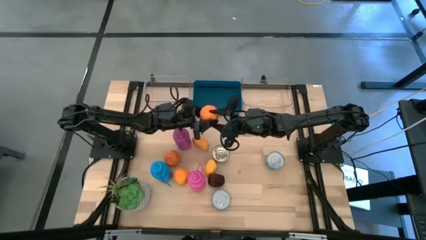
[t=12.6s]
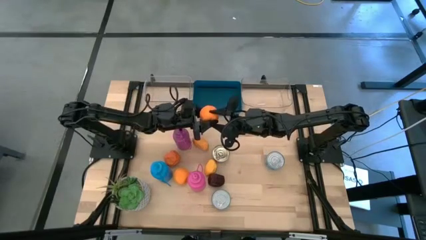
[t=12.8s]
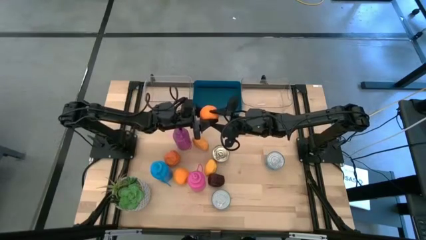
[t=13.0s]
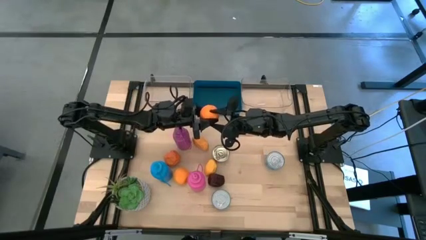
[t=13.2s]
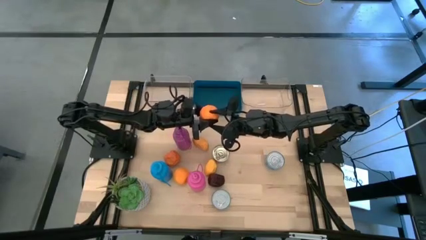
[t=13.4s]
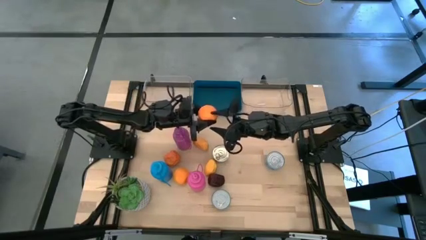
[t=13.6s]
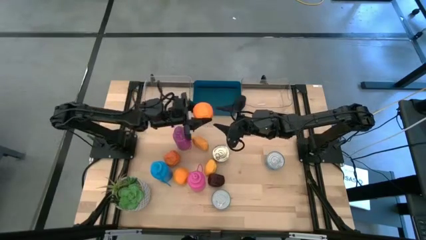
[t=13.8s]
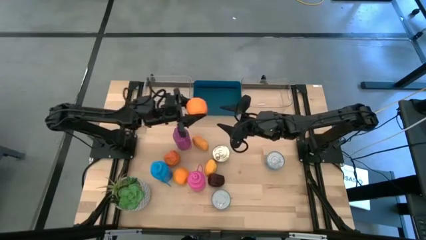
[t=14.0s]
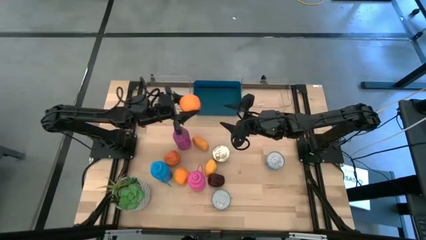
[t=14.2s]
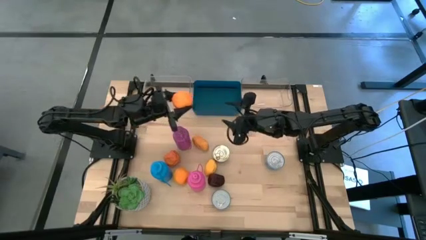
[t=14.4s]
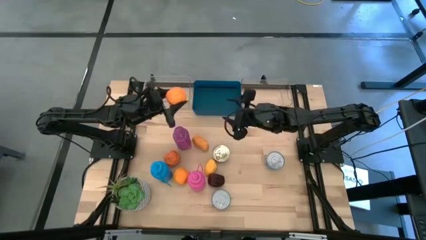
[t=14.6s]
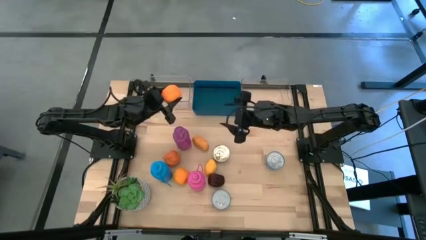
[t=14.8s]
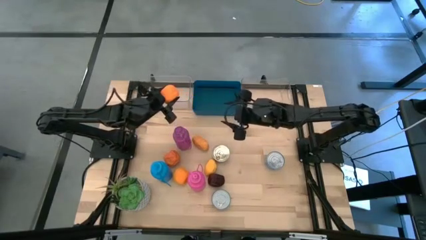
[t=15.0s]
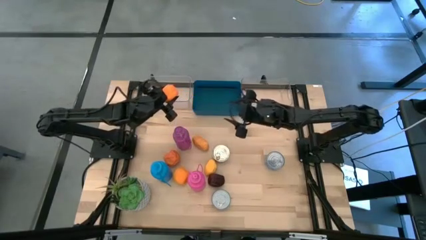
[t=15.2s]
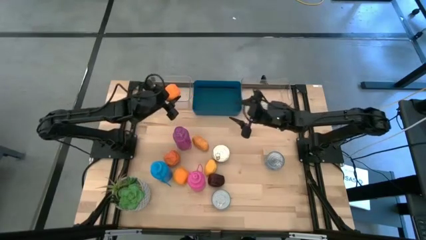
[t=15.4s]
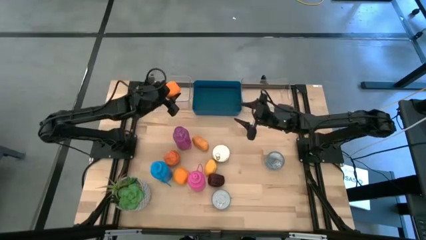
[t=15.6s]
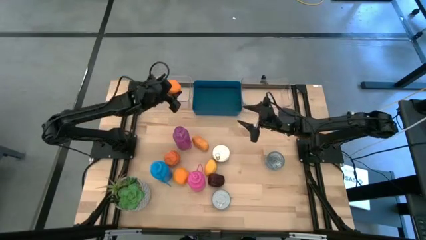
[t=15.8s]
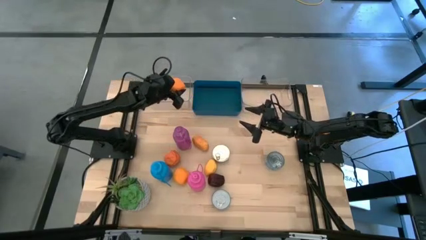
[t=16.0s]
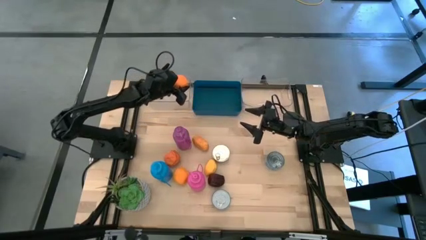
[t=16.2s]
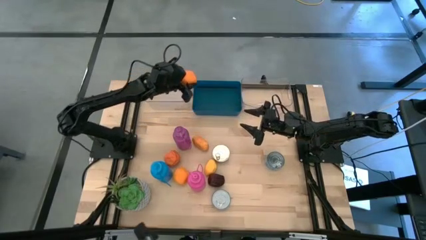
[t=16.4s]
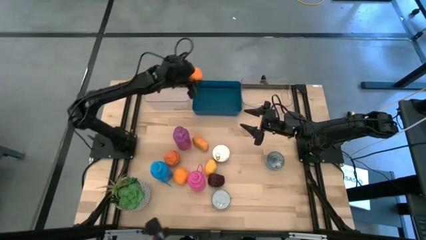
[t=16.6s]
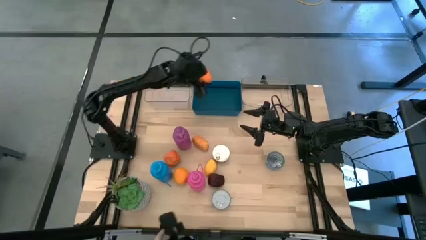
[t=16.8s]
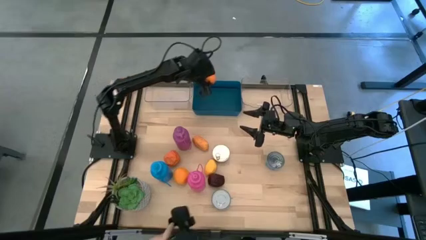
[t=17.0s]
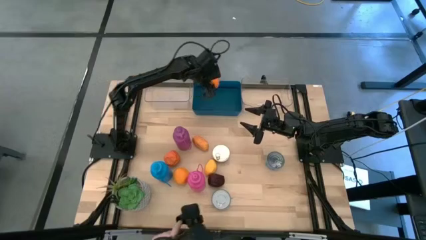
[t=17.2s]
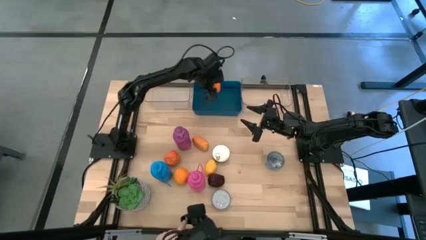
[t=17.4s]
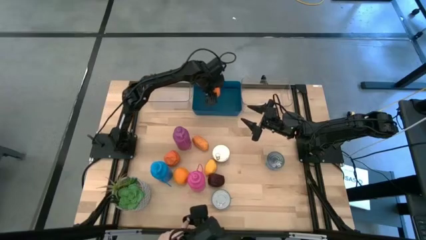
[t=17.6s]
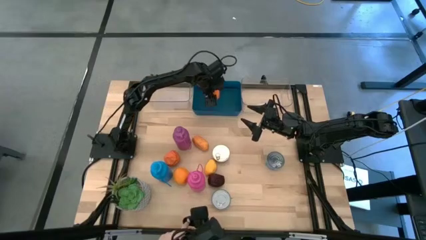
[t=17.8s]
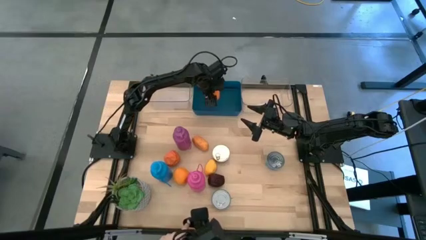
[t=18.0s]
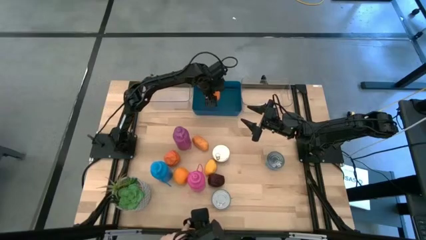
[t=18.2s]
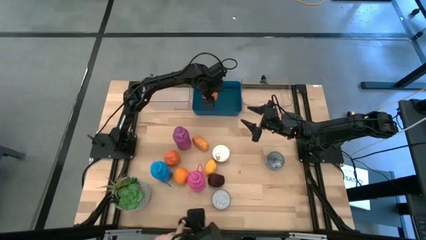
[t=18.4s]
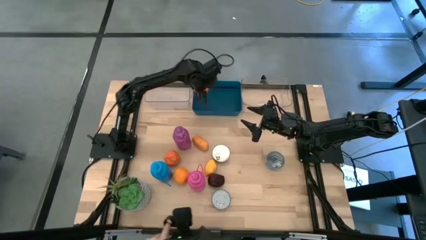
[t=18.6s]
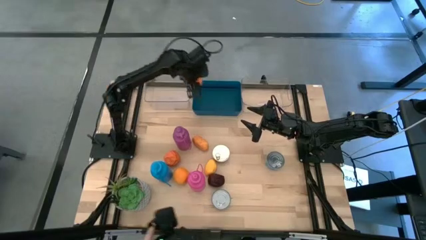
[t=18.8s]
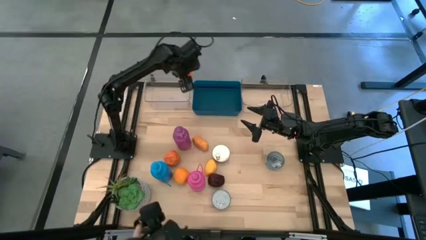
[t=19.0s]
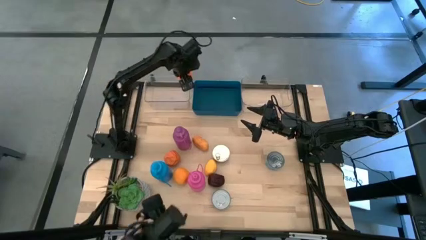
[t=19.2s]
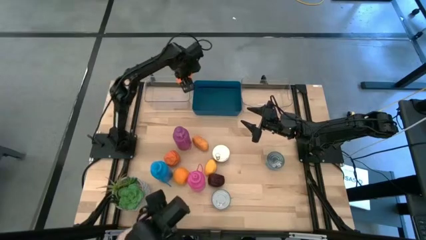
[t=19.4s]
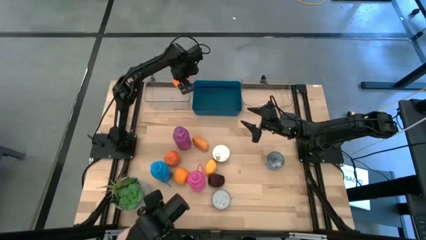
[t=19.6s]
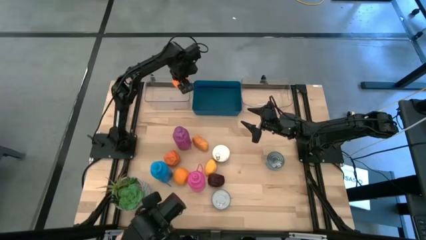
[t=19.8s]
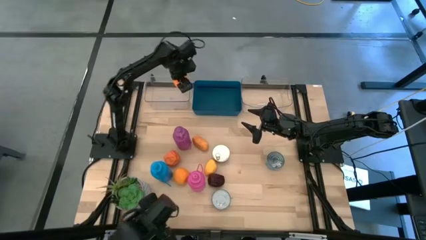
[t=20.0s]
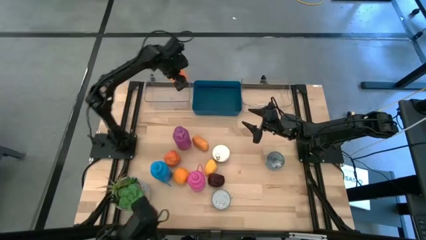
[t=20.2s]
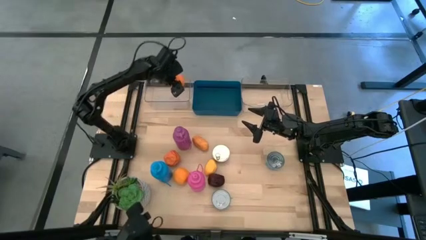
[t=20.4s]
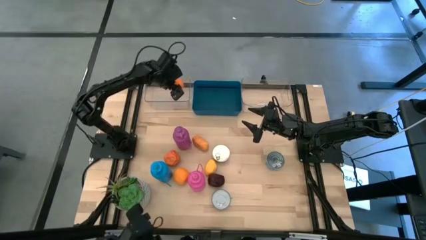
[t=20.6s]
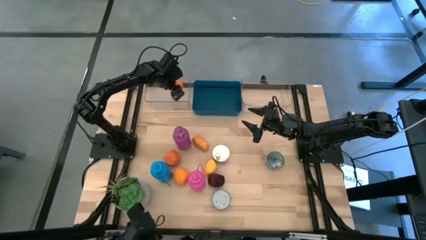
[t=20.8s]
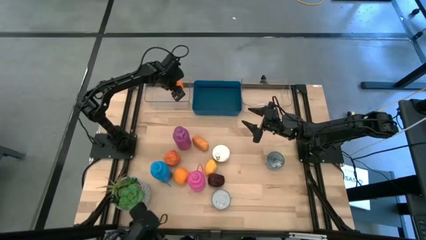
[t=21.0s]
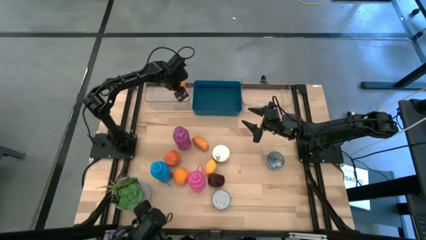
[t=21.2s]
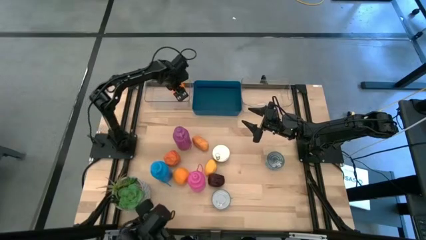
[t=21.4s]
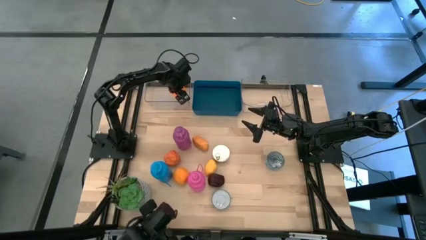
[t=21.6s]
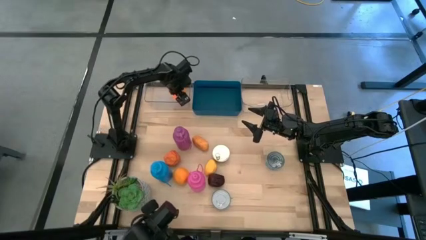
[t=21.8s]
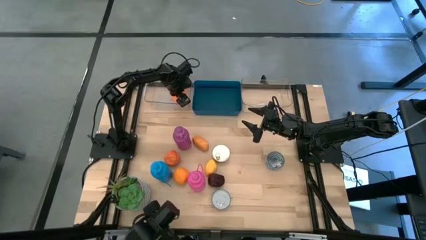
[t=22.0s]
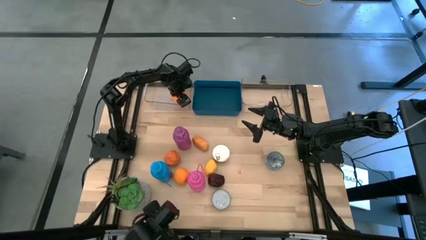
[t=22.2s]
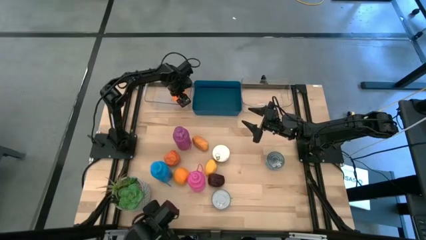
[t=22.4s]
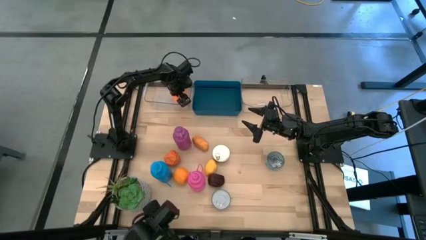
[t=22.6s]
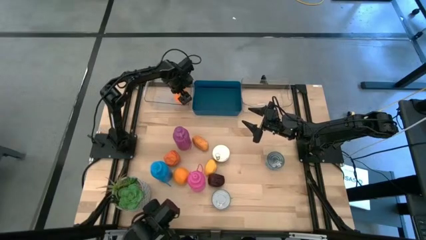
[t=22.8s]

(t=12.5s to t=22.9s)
Task: Pick & Place Food Item
Put the right orange into the left transparent bin

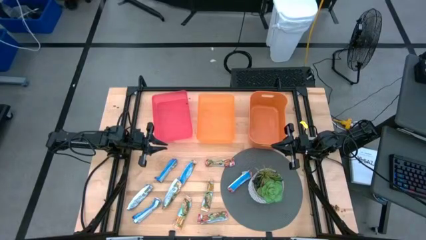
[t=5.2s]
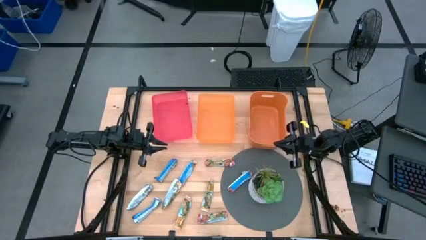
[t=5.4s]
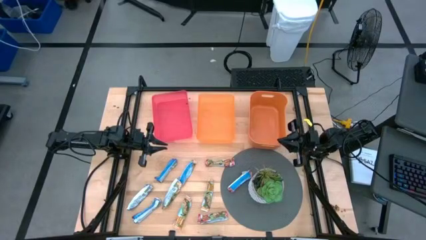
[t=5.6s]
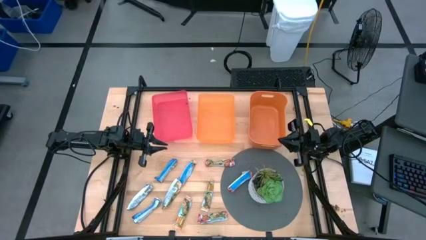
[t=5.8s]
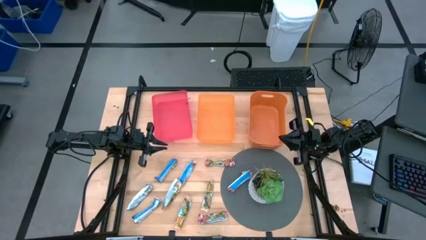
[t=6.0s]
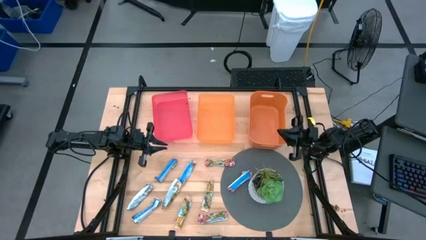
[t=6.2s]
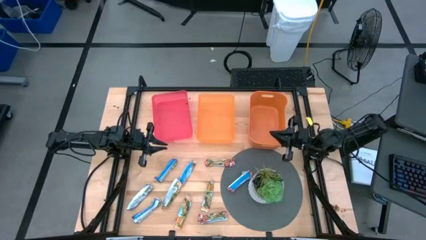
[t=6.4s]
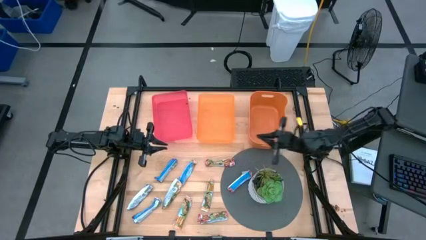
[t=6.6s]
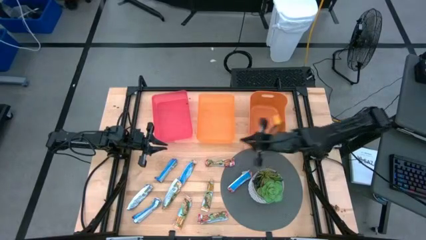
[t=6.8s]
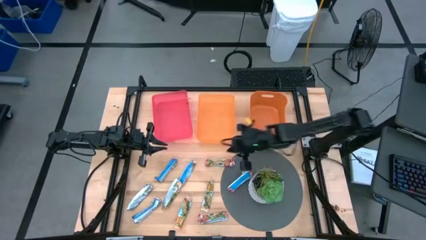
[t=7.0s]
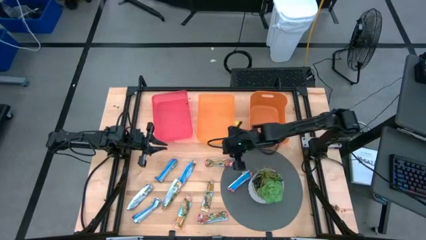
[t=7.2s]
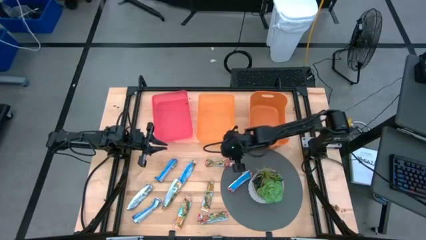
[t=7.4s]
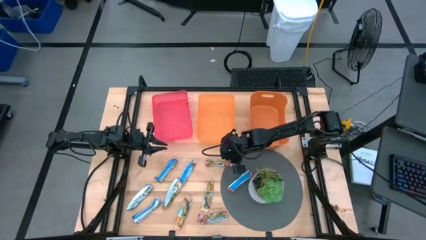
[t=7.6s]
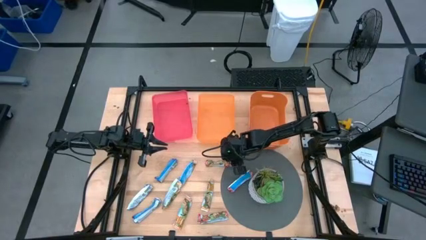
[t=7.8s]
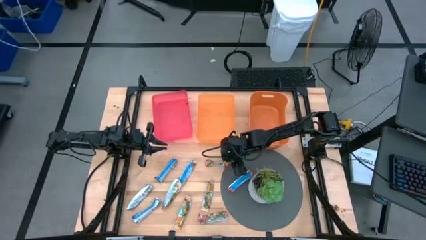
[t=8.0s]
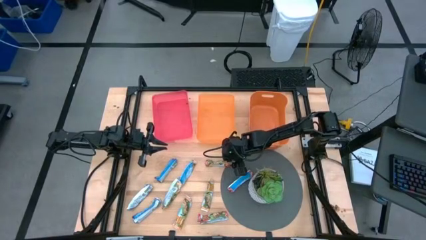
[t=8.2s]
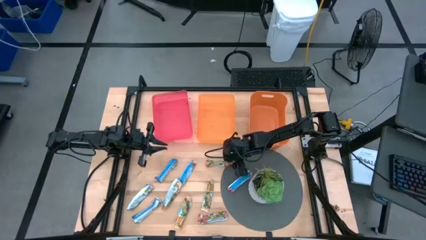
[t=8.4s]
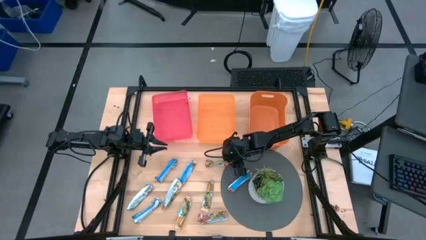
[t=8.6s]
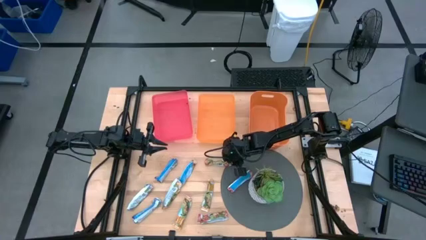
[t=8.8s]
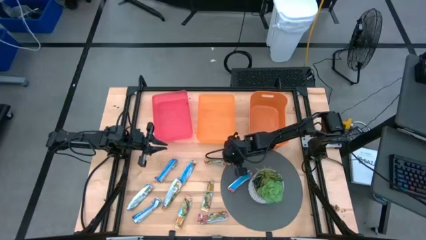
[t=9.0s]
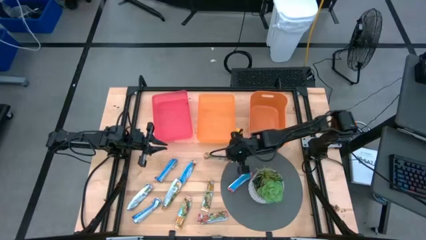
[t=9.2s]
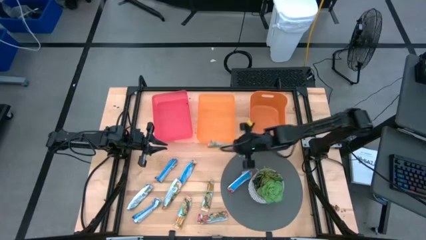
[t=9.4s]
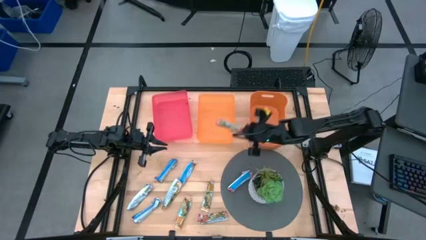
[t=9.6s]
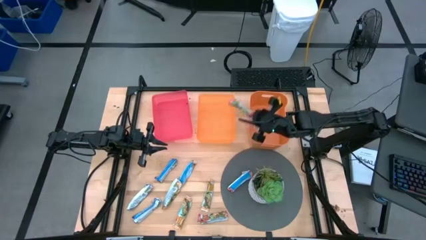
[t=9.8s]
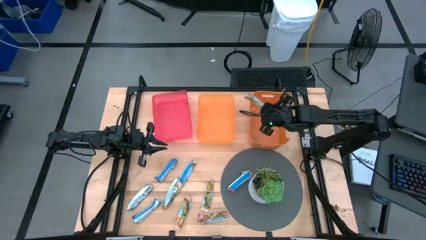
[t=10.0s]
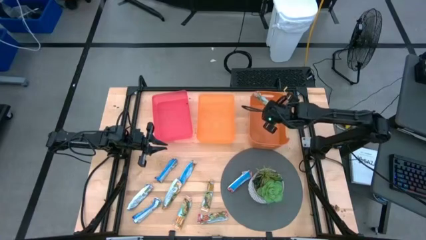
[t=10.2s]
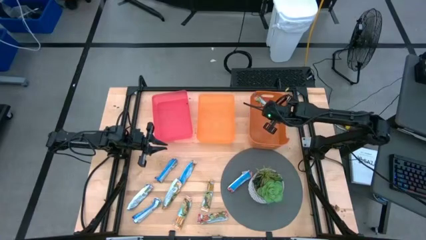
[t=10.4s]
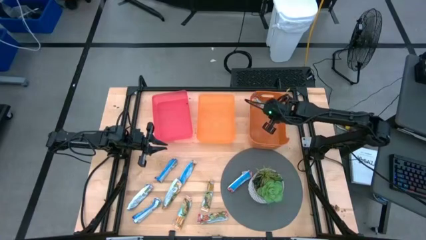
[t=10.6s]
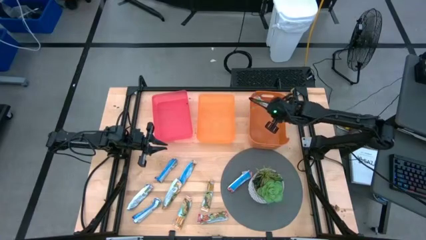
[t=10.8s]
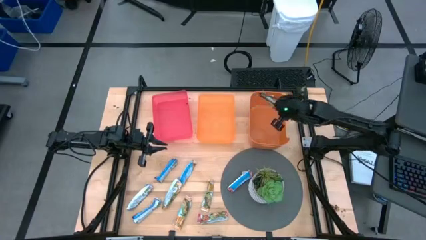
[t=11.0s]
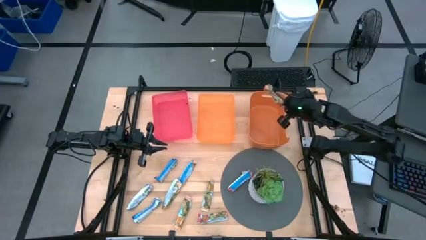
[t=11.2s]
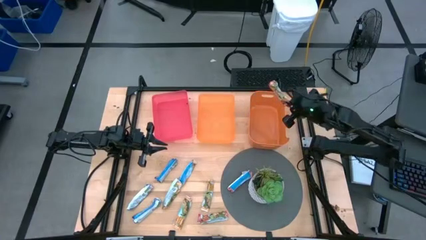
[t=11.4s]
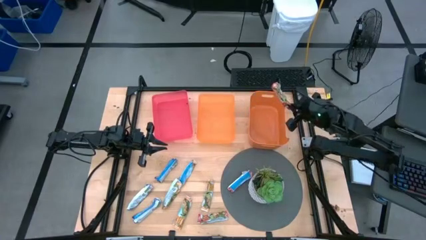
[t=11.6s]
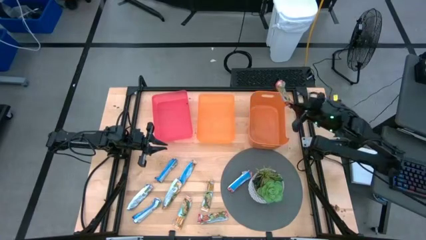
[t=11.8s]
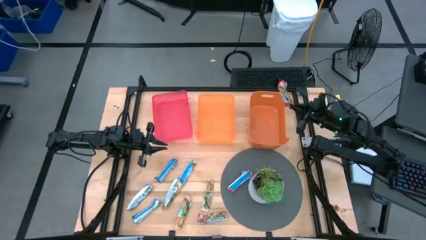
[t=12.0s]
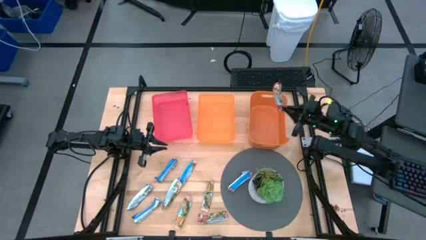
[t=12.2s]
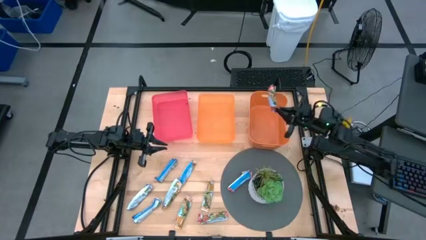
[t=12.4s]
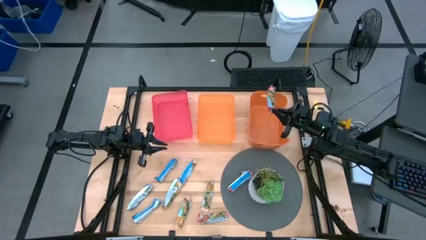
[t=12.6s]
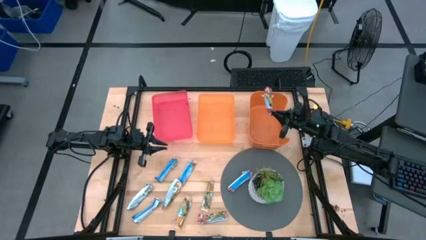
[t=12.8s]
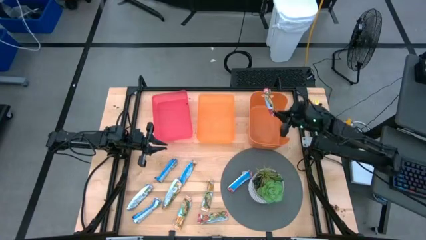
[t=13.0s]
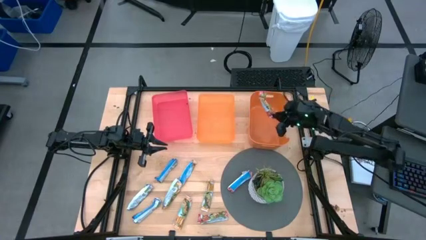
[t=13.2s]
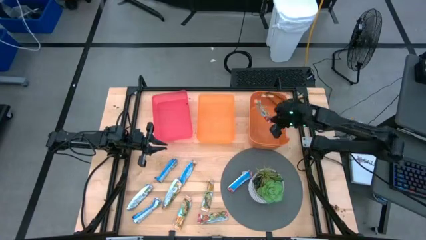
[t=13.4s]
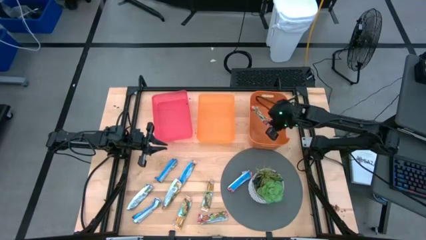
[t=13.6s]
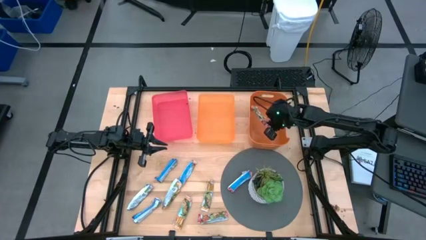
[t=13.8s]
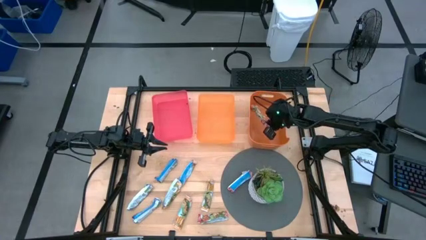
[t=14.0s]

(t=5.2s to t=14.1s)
Task: Pick and place Granola Bars by type
Put the top red granola bar into the right orange bin
